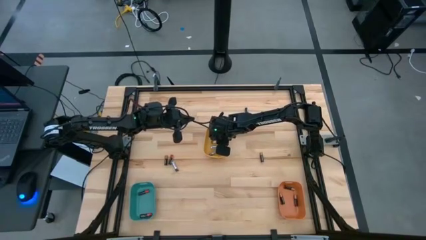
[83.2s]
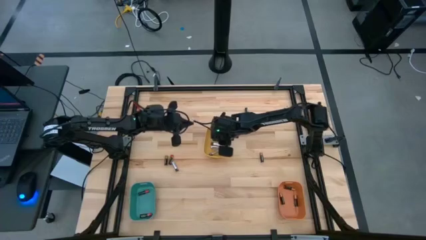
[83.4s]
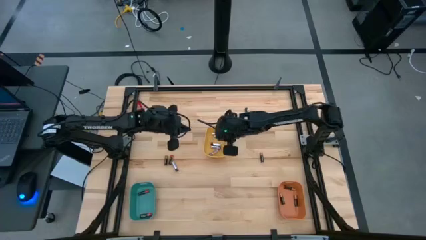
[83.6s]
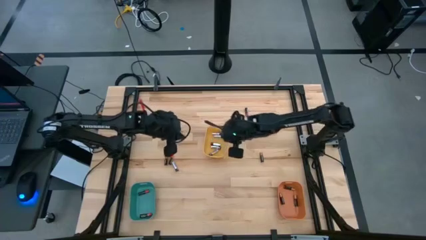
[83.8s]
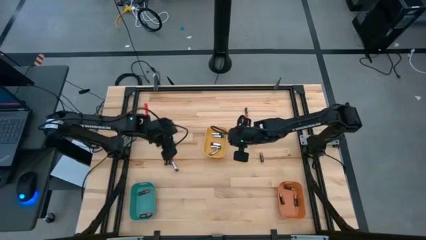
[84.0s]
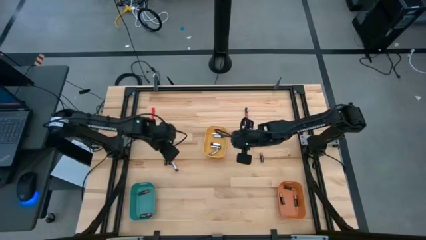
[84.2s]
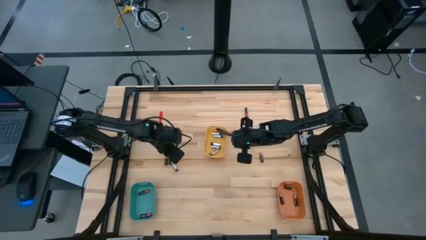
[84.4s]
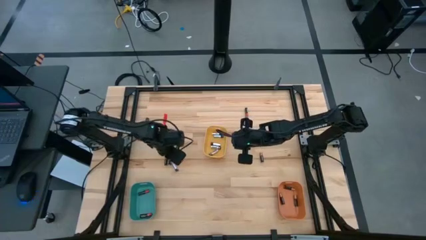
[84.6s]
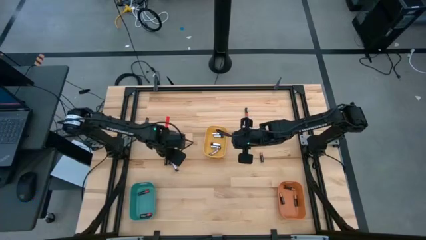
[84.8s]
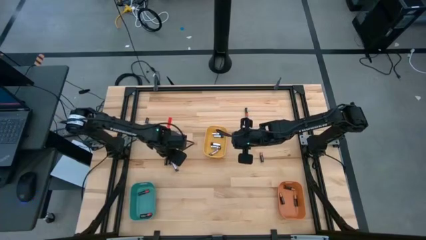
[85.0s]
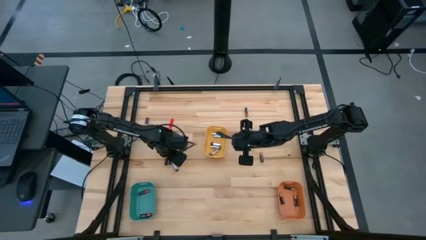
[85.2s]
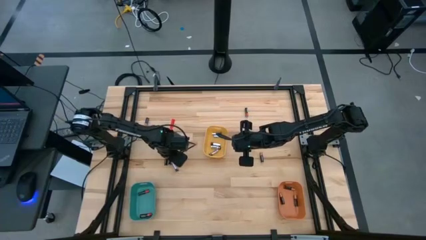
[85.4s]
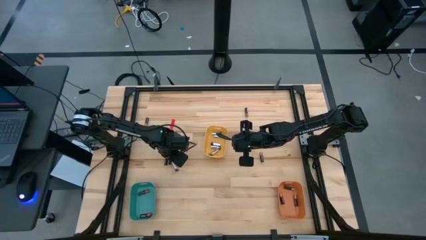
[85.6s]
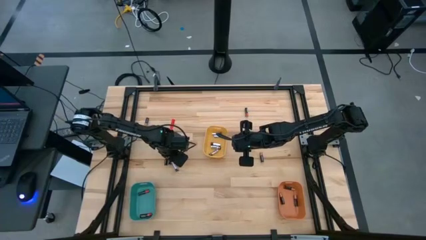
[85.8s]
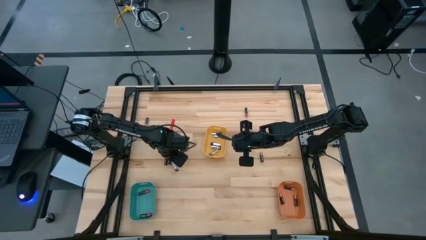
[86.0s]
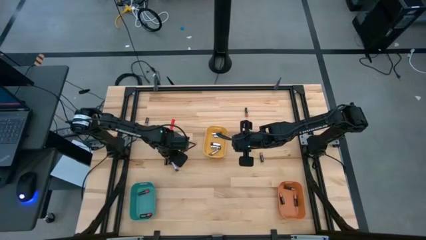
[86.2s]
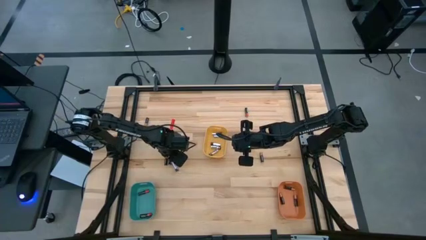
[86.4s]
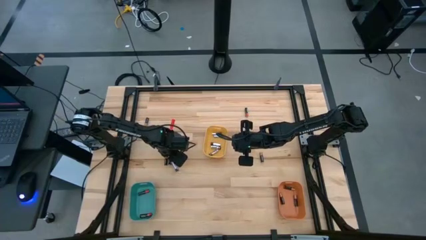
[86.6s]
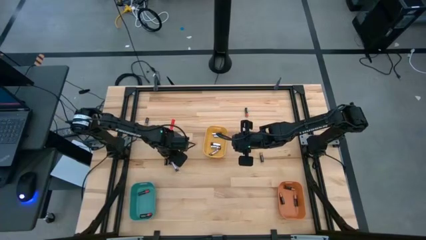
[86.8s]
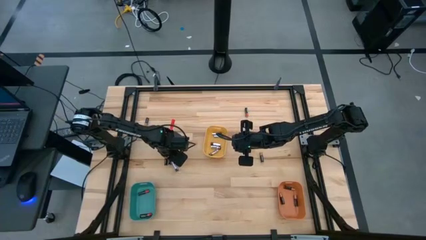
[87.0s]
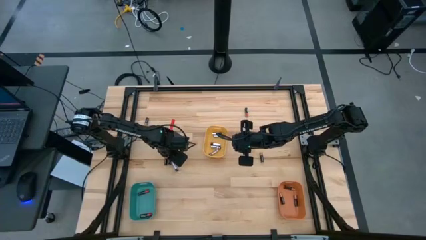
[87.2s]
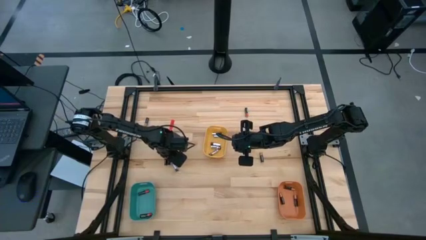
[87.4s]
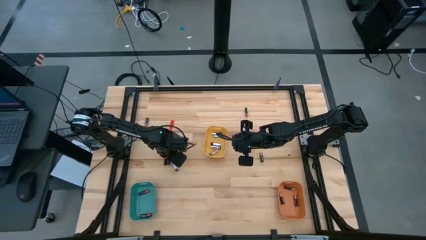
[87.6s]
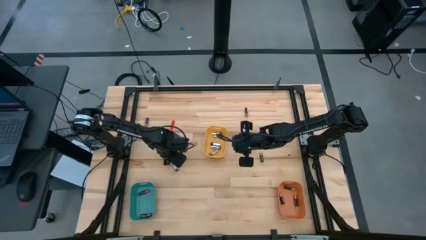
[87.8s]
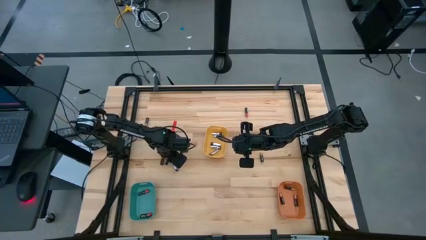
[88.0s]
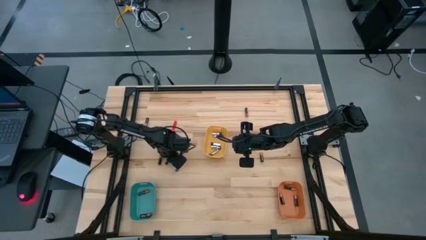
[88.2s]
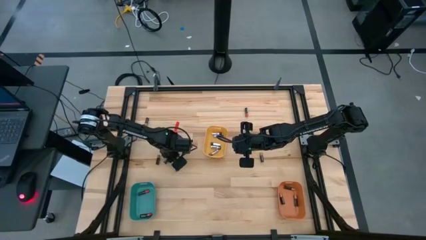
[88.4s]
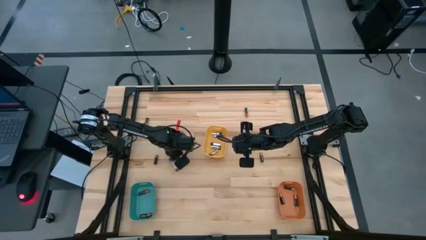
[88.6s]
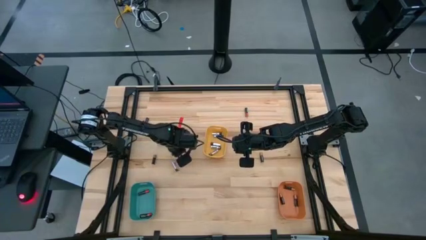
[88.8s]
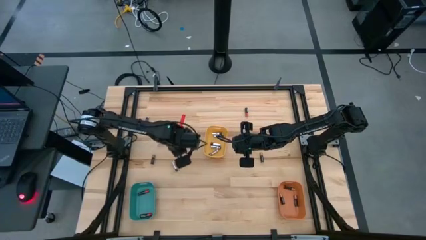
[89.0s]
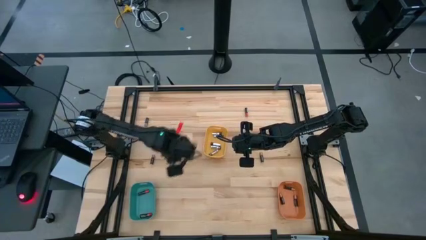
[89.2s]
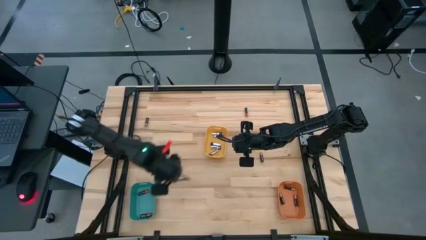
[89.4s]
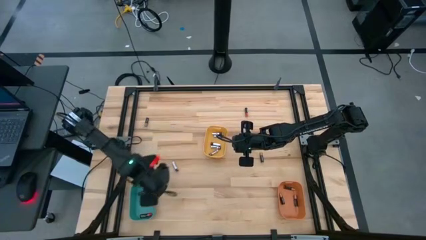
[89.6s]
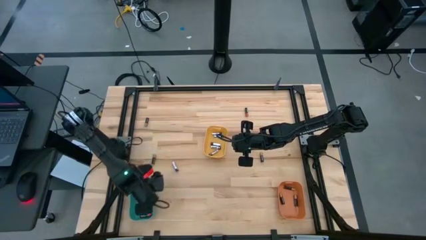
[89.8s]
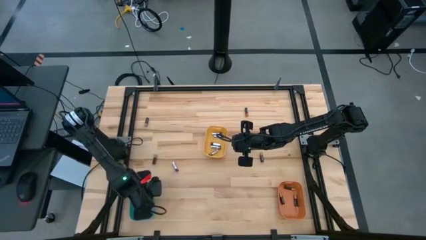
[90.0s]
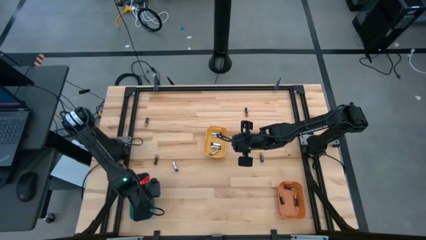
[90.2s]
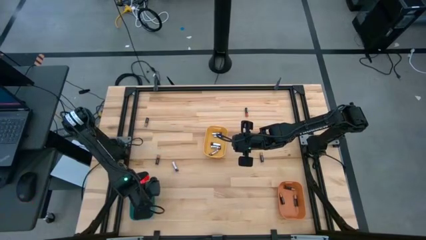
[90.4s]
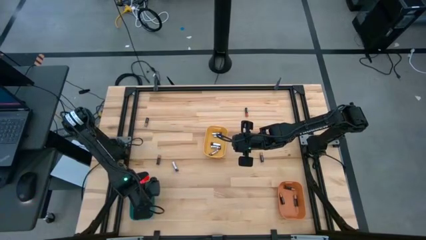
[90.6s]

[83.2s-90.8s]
Task: Sort batteries
Put the red battery into the blue bin

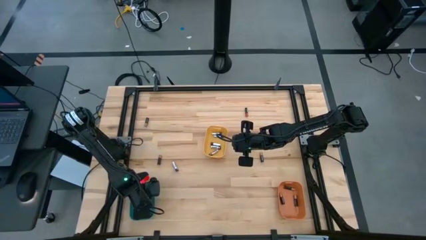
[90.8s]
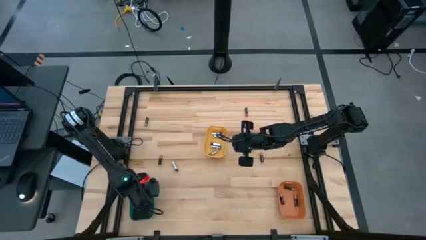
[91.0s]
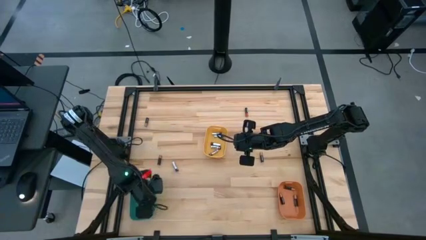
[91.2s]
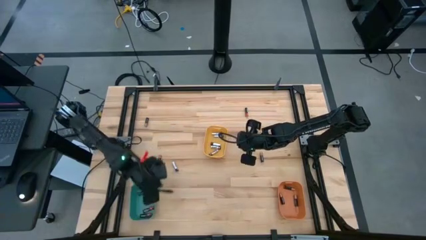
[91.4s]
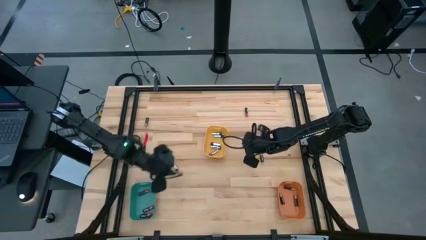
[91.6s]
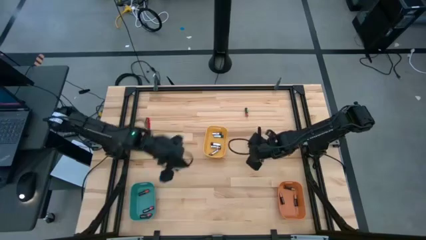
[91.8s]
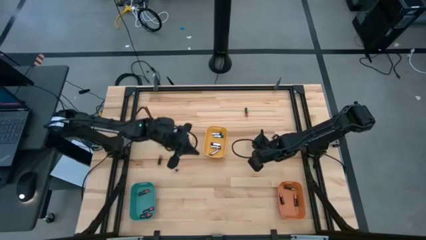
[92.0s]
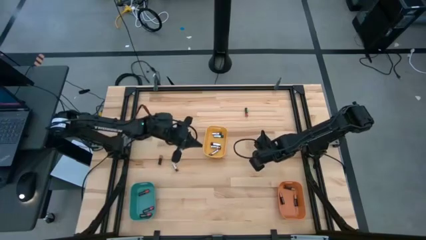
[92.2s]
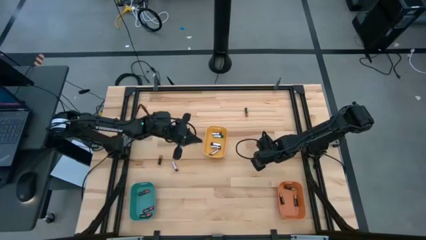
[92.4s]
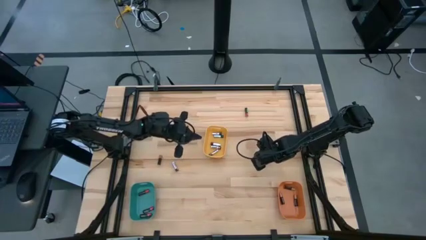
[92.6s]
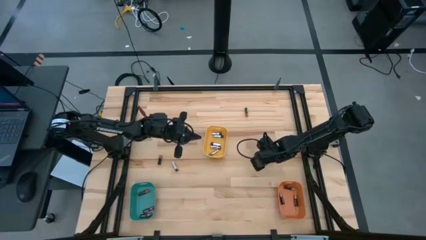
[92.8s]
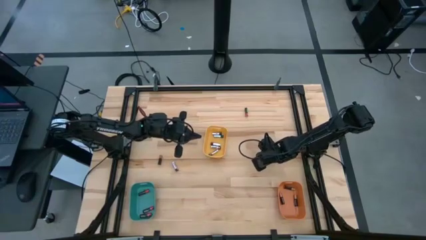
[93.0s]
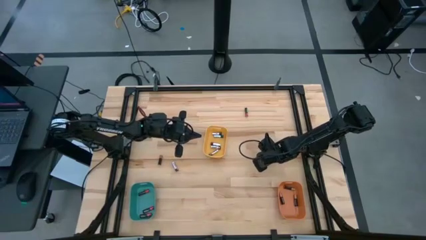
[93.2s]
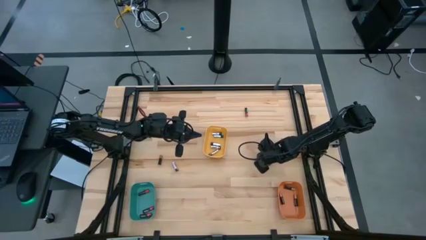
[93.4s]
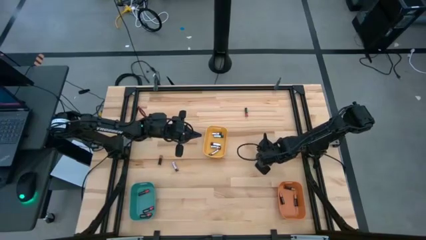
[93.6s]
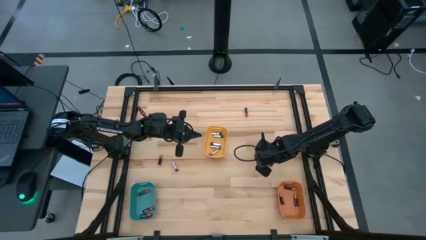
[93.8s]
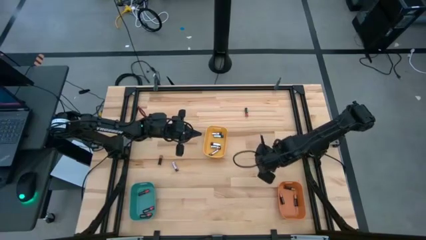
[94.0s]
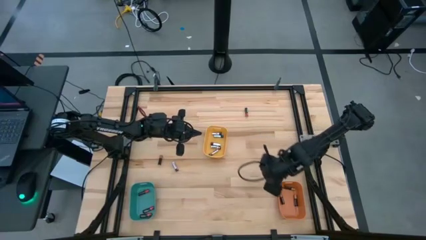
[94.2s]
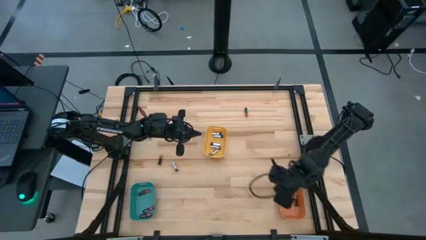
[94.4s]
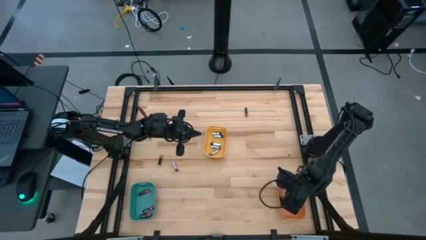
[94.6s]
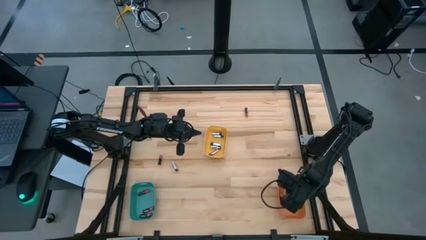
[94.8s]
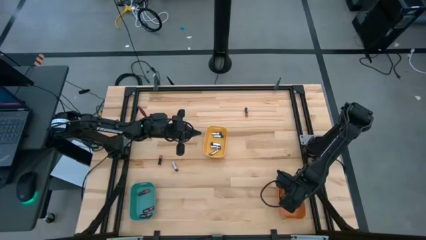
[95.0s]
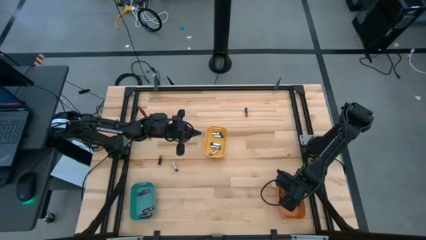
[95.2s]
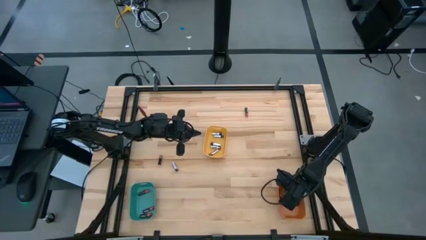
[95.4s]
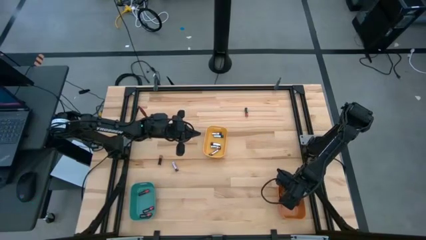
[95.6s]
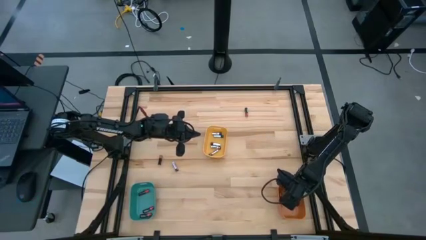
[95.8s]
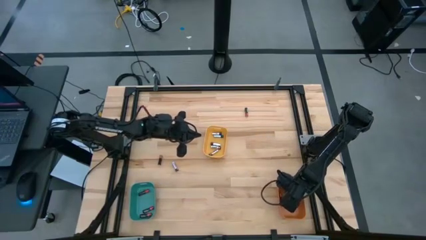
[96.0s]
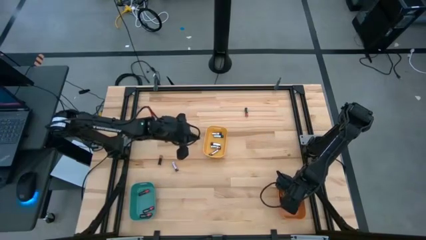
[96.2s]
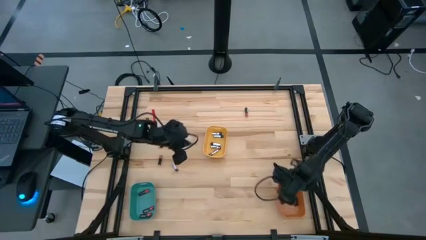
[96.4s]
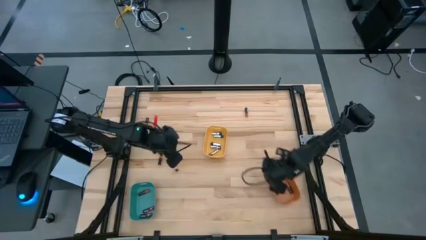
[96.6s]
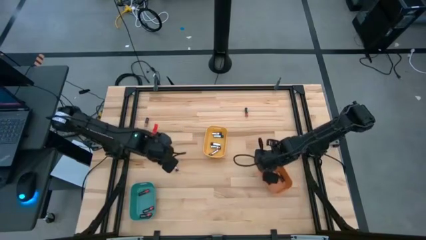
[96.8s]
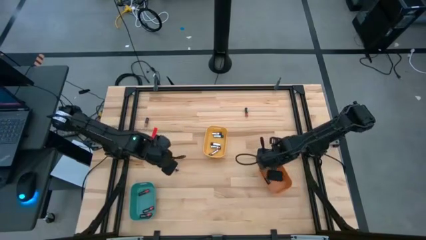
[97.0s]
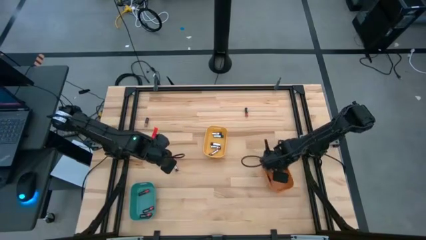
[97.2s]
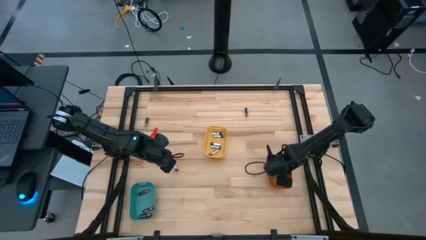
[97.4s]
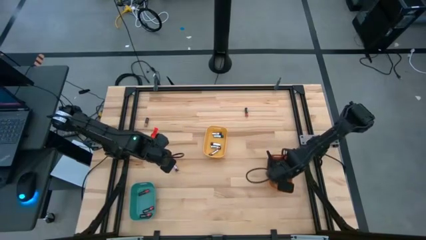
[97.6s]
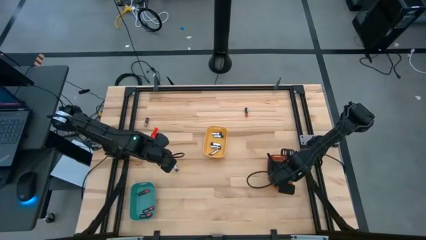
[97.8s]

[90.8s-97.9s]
Put the brown battery into the orange bin

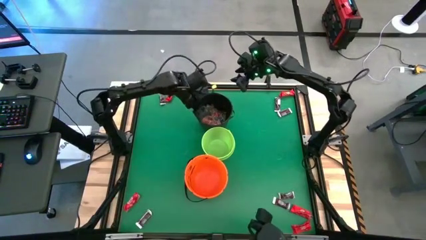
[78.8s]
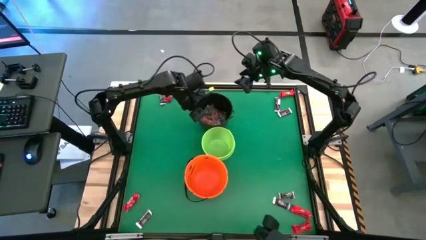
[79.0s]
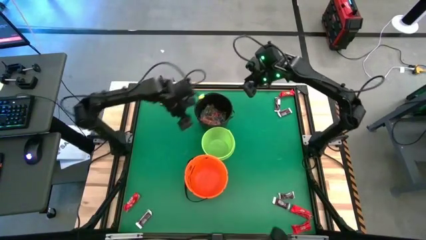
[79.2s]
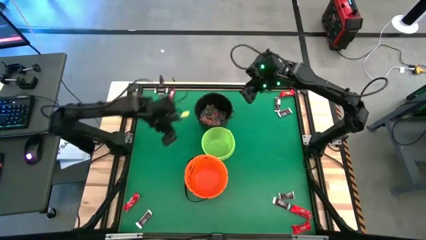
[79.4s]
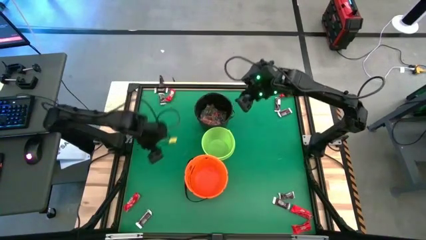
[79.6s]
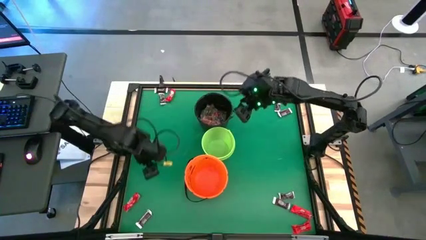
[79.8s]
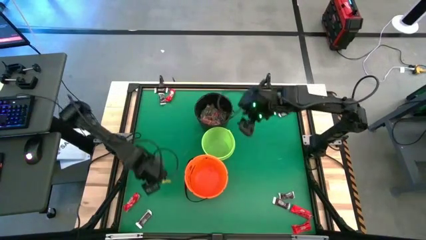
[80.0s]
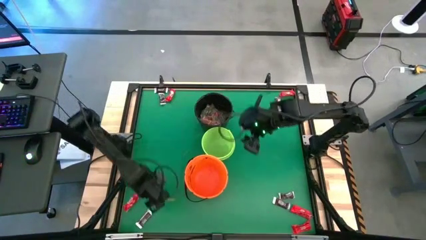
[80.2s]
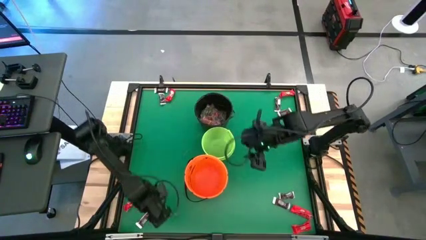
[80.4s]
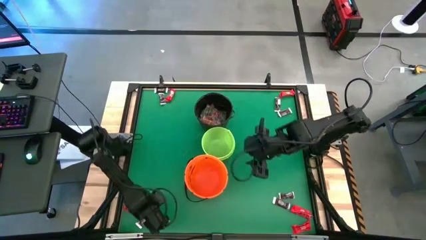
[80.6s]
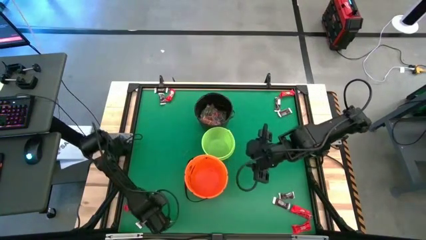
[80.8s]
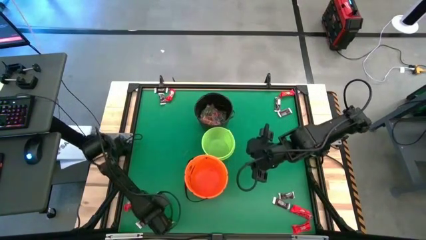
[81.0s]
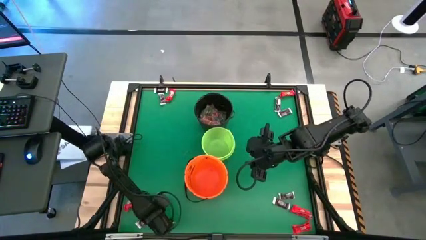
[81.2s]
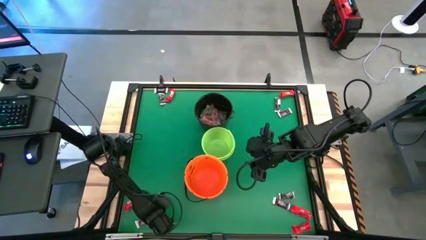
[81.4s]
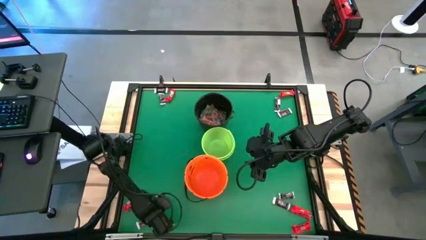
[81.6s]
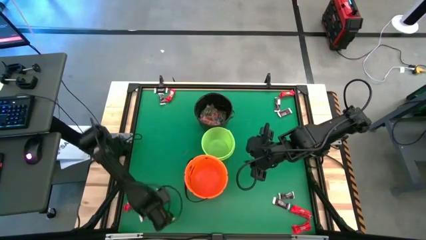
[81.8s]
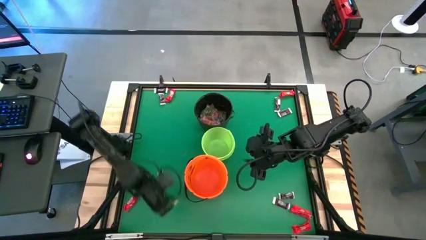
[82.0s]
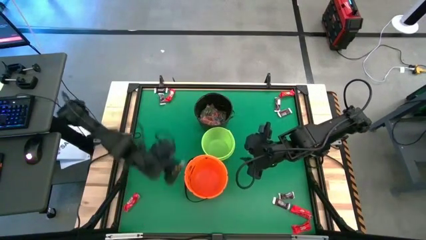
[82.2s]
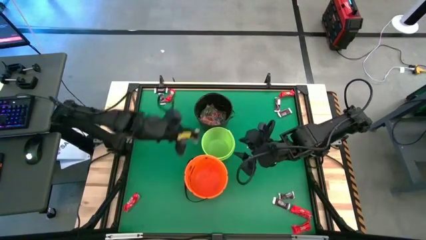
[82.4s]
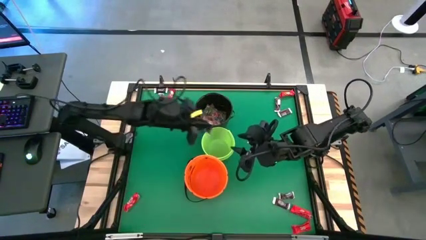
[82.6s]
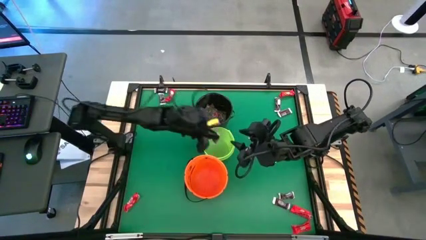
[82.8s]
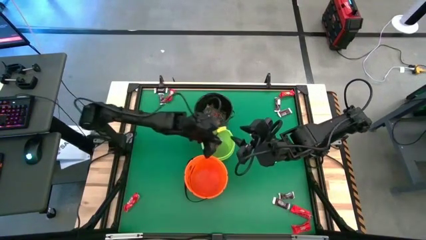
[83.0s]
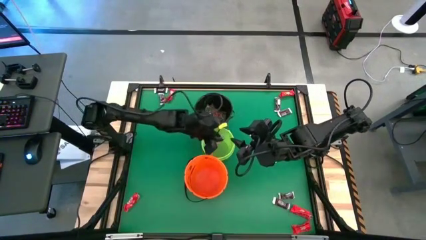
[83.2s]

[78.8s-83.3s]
Task: Sort candy by brand, put in halloween buckets
Put the brown chocolate bar into the green bucket
